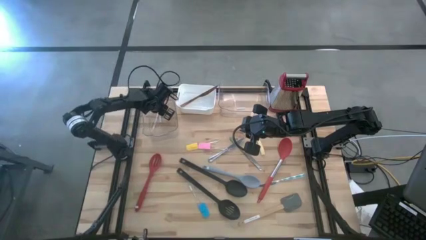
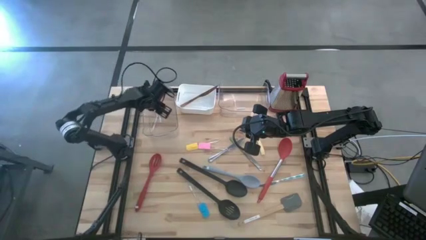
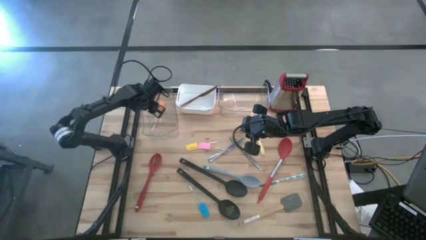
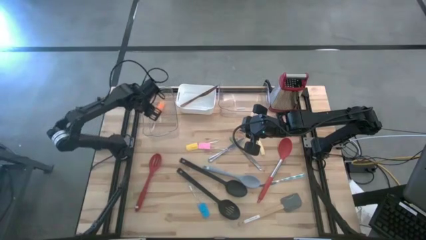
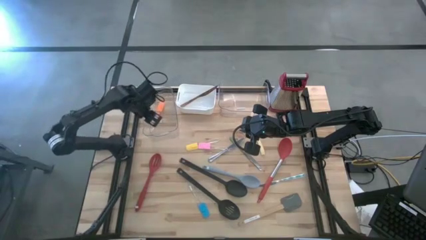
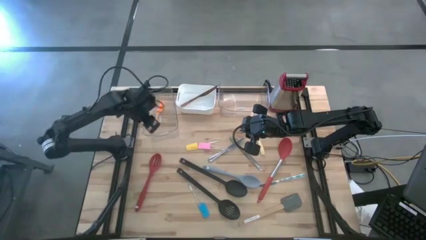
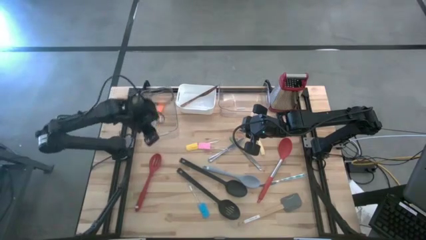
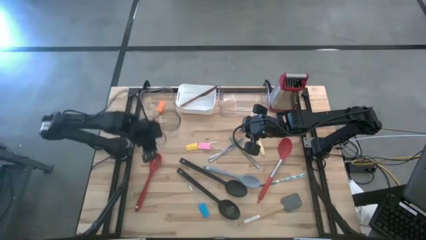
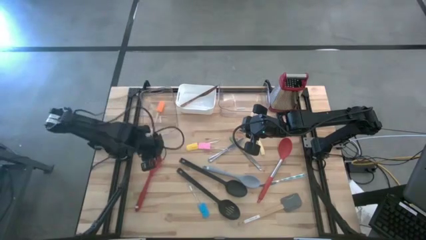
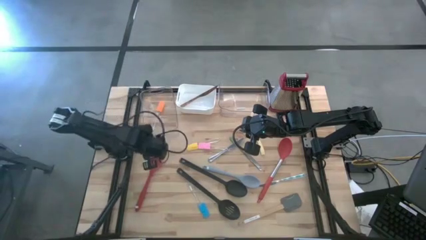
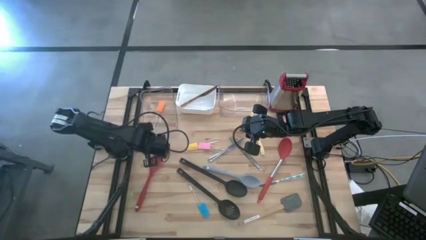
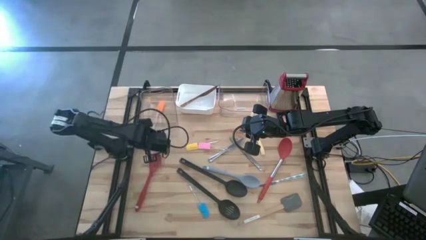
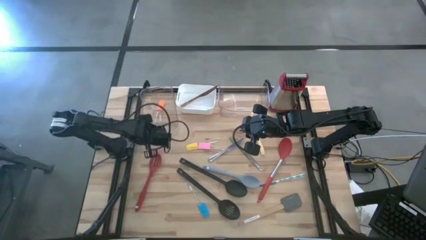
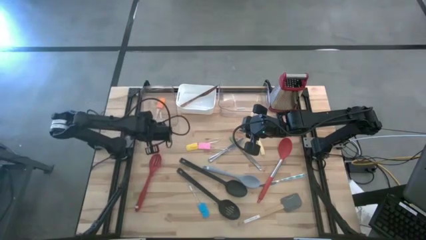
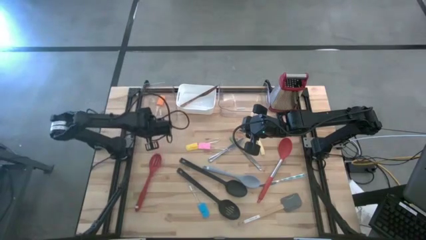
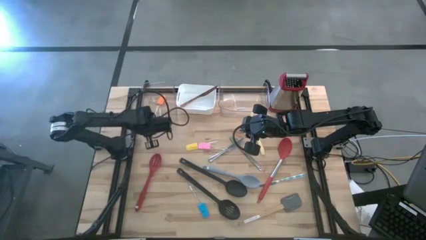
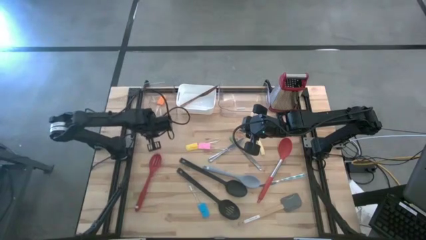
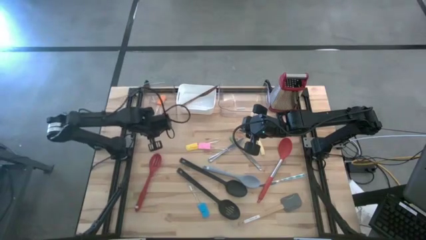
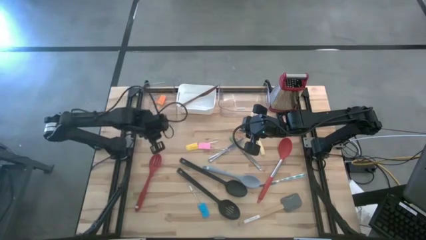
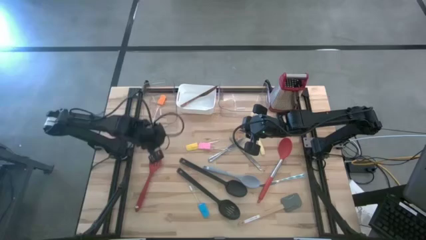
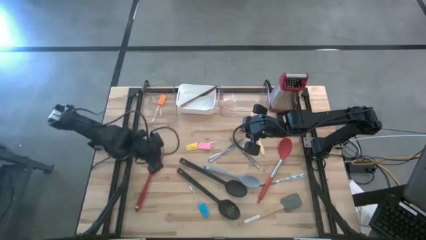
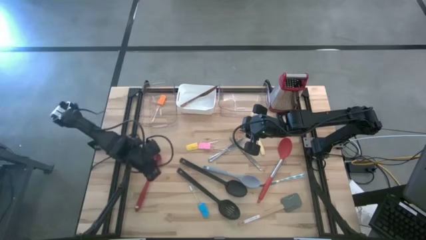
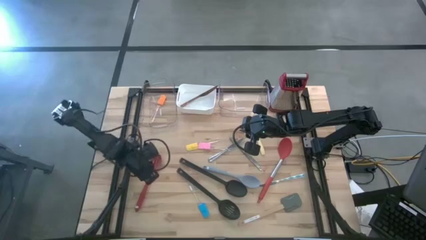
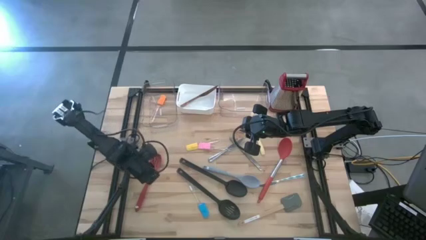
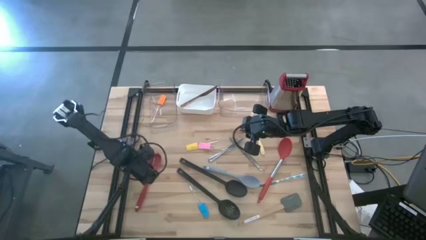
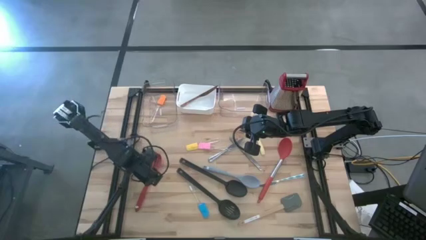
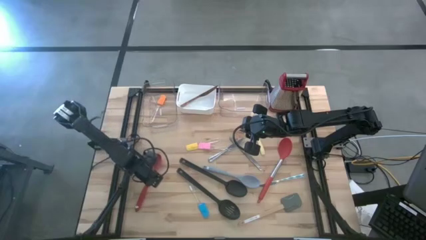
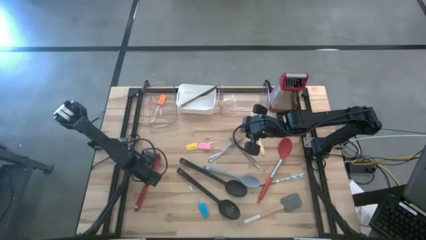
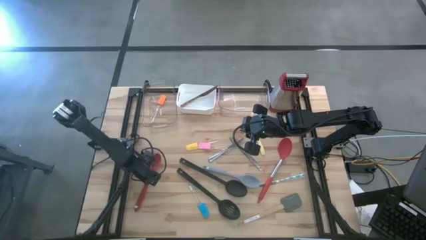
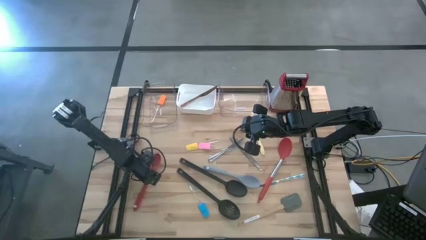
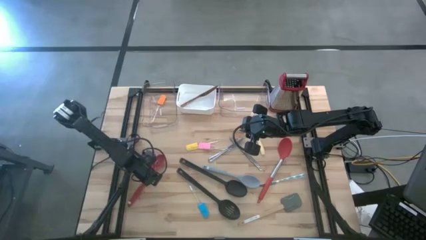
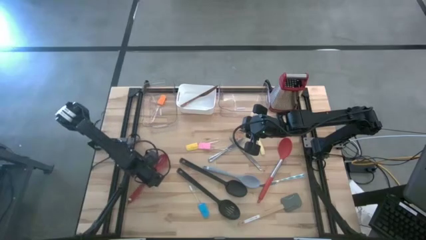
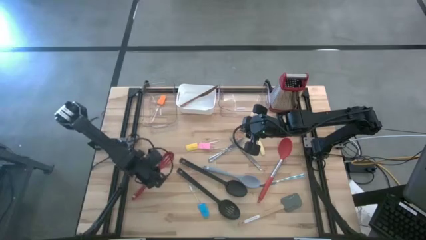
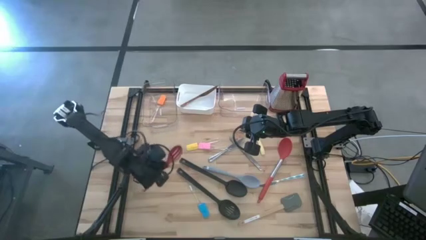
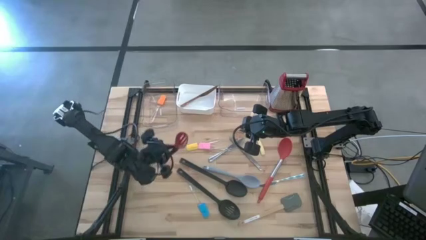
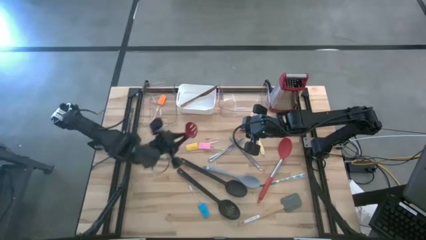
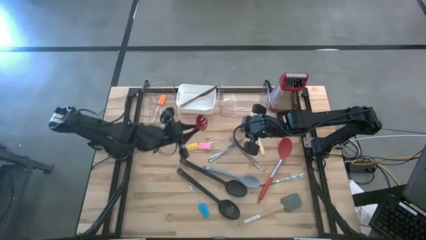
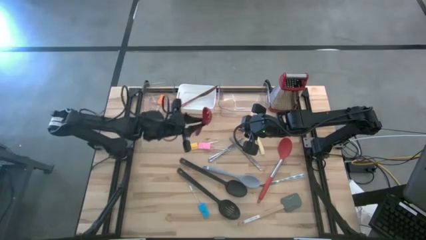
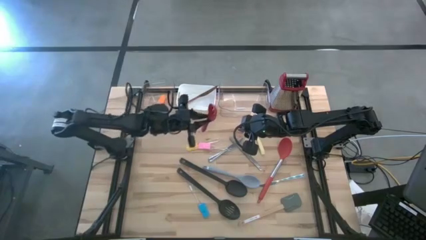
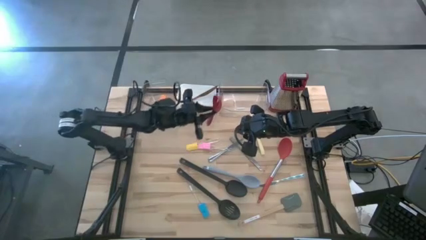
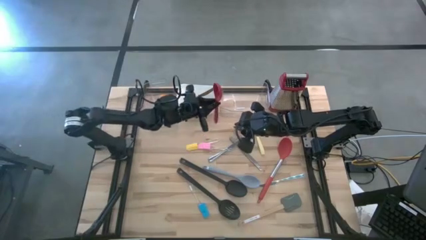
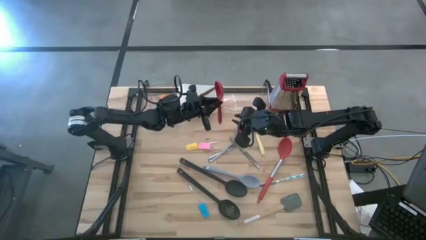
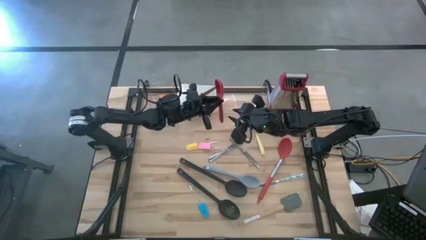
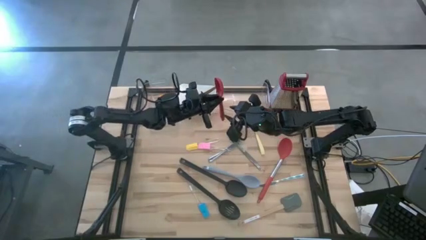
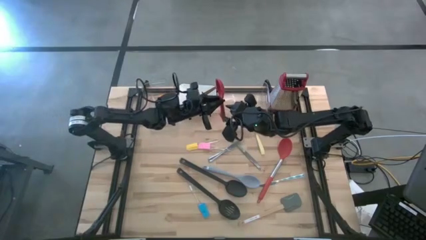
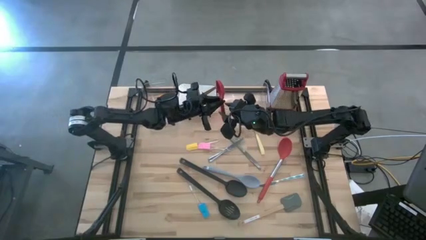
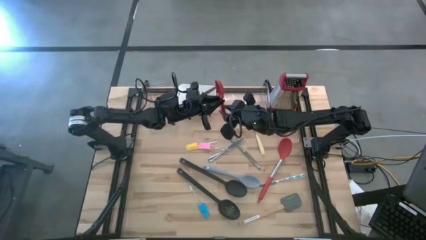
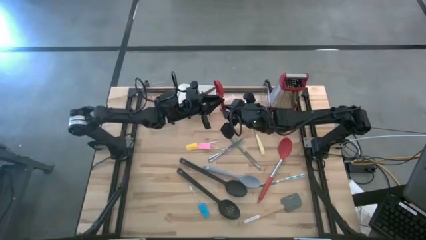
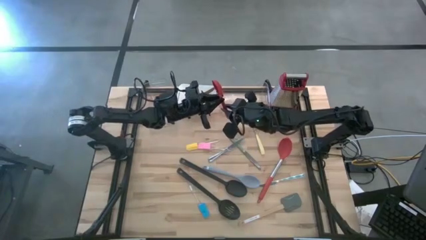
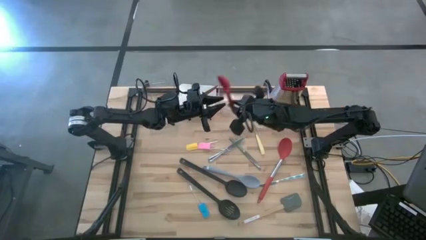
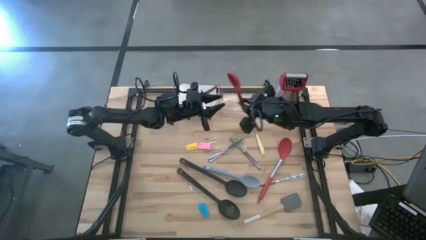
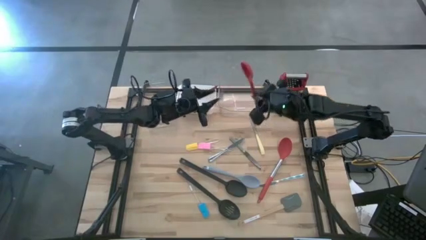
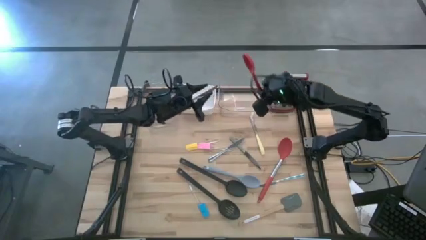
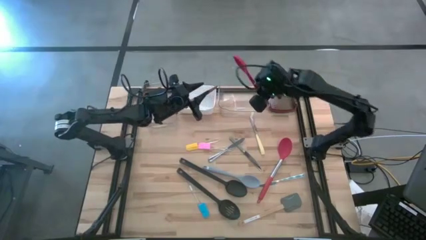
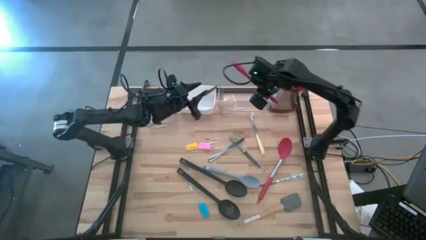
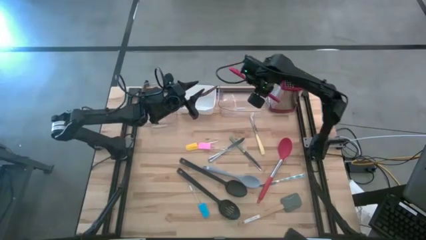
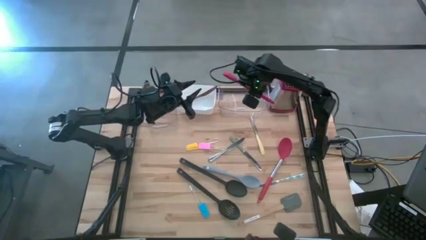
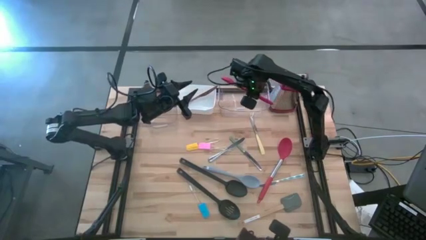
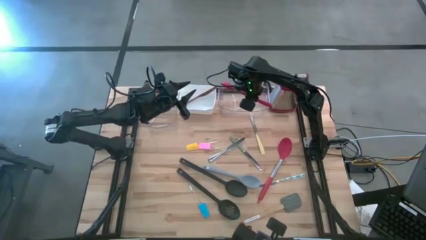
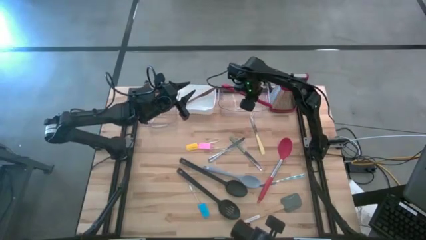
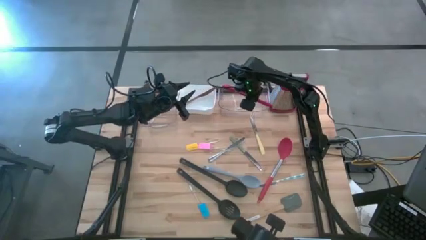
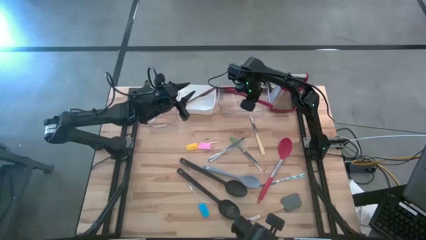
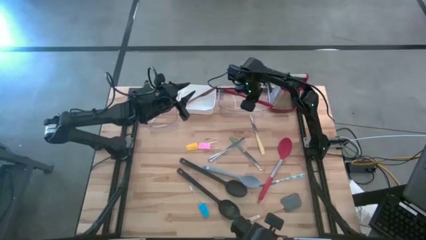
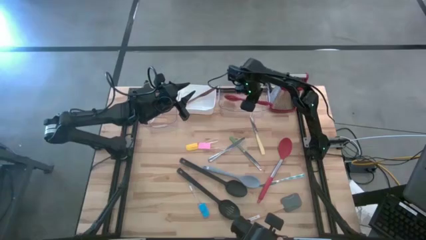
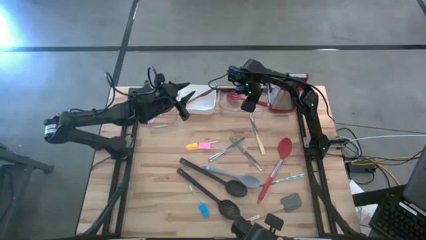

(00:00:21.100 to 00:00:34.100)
Task: Pick & Place Kitchen Items
Put the red slotted spoon into the right transparent bin
